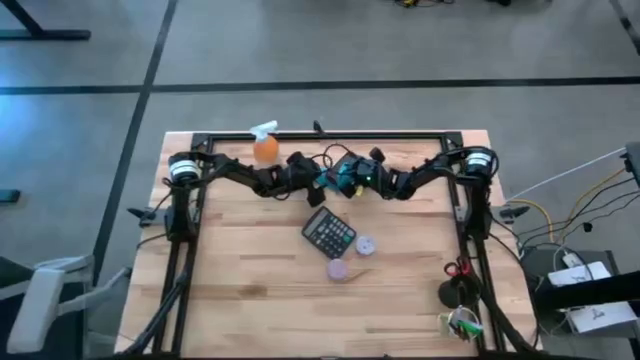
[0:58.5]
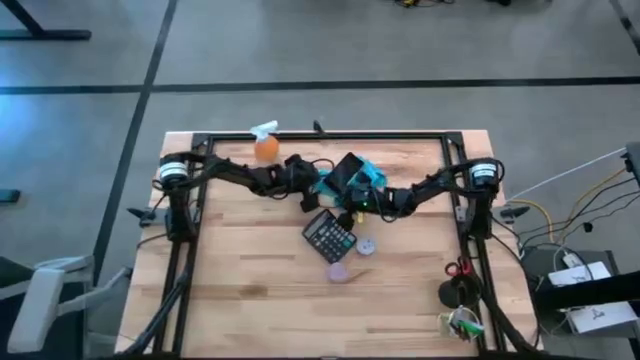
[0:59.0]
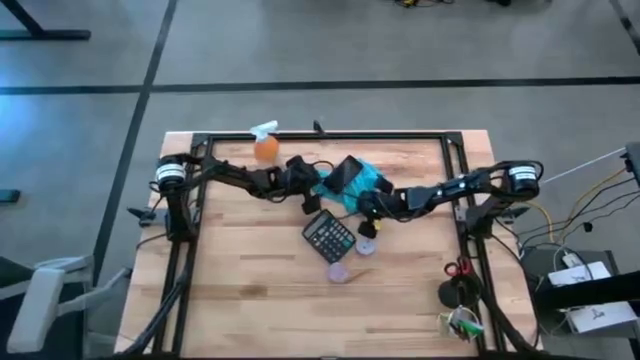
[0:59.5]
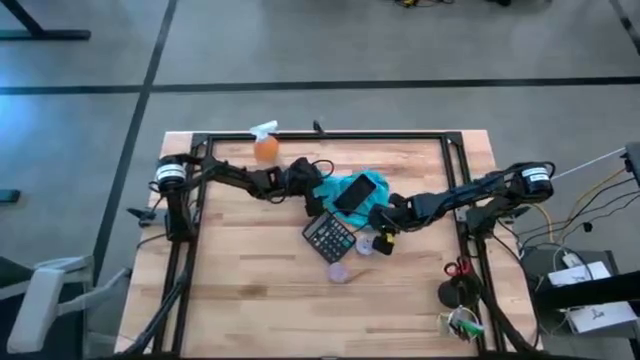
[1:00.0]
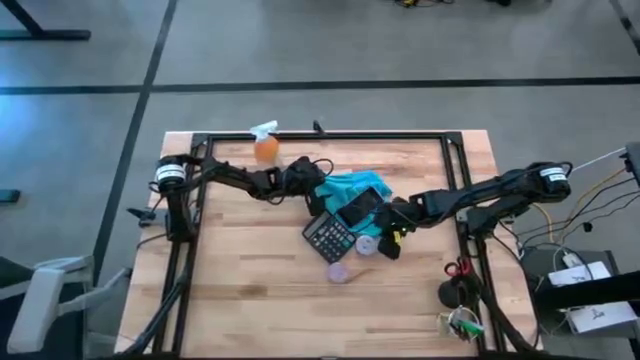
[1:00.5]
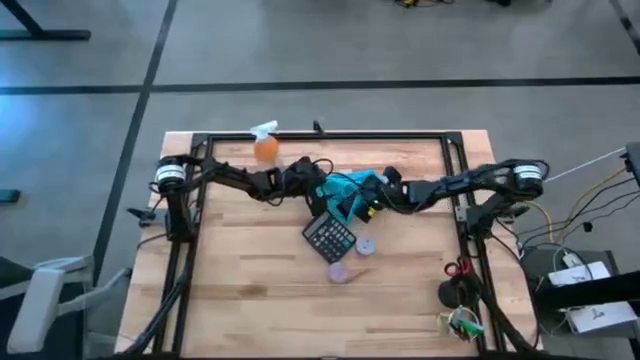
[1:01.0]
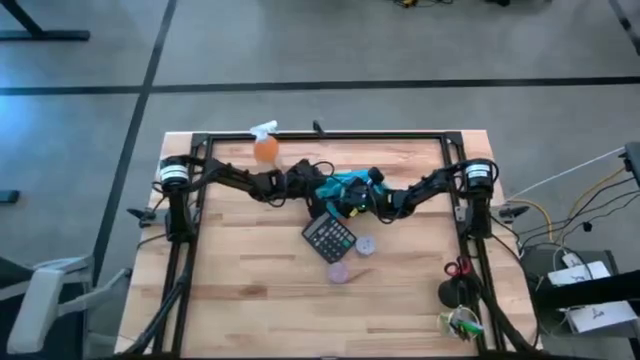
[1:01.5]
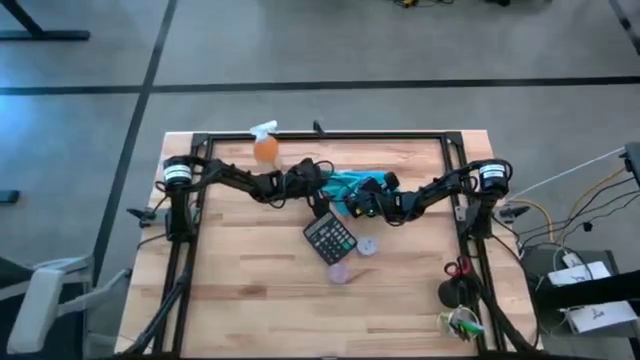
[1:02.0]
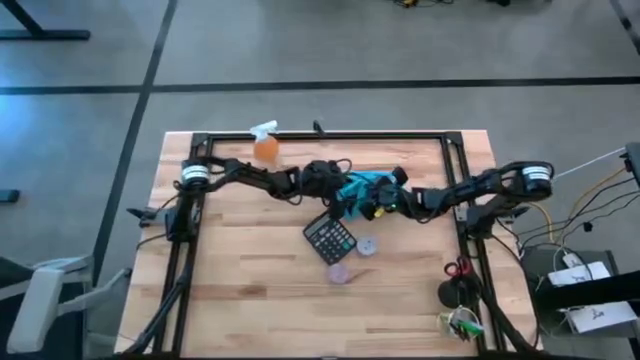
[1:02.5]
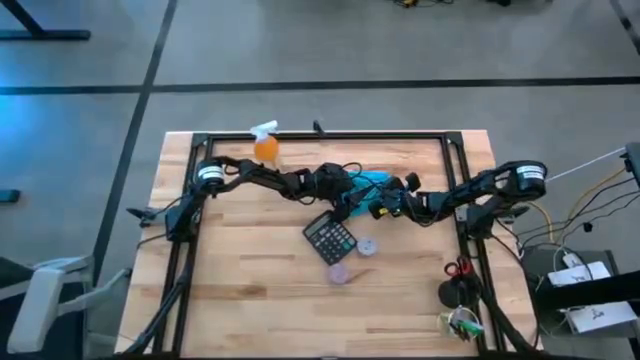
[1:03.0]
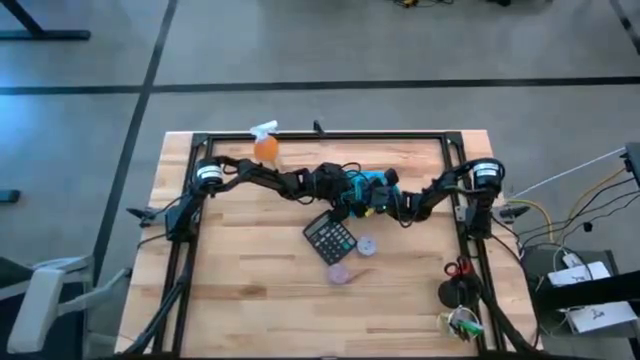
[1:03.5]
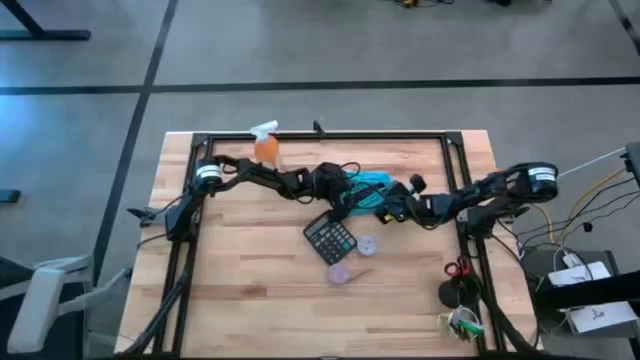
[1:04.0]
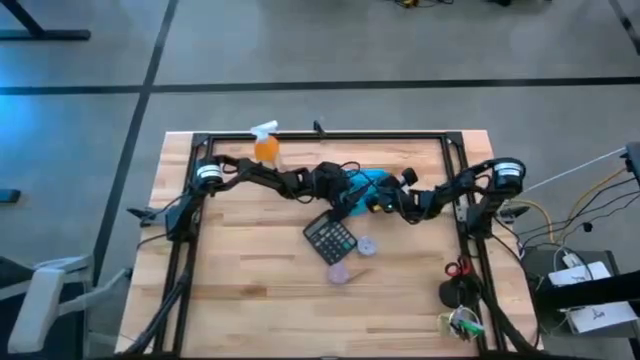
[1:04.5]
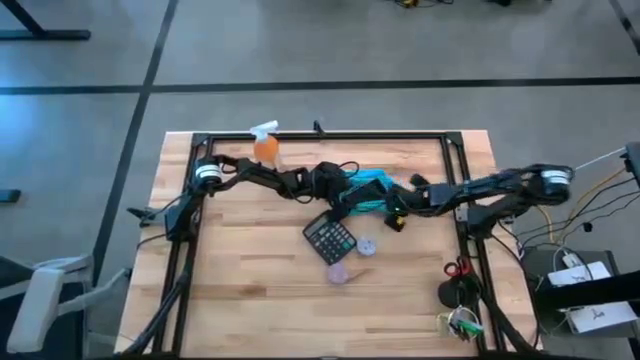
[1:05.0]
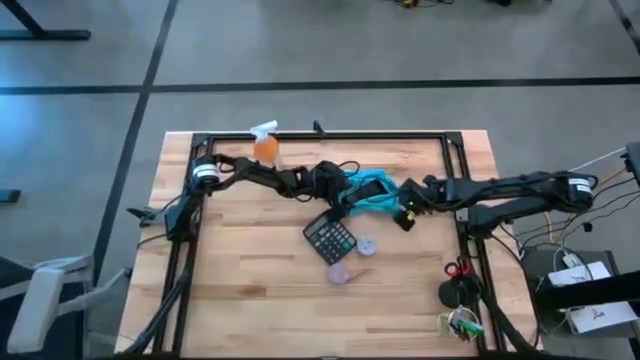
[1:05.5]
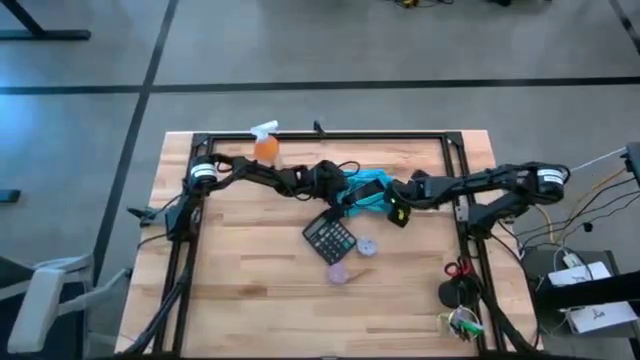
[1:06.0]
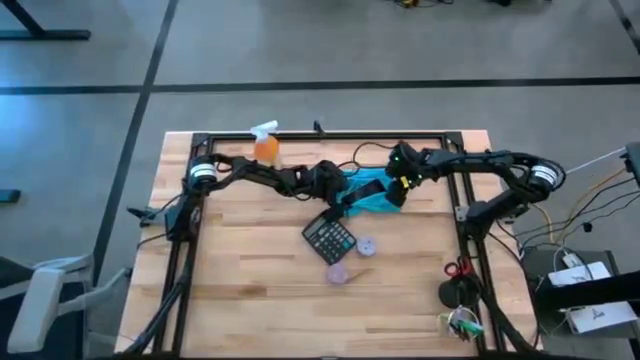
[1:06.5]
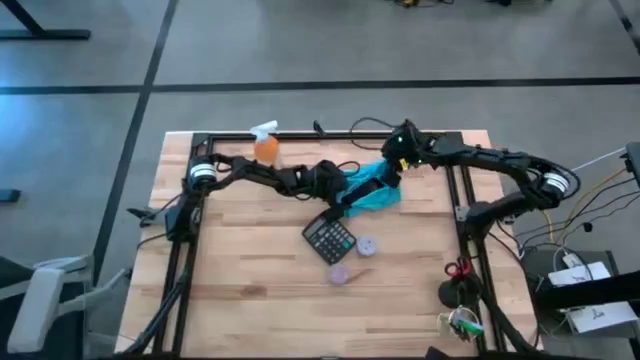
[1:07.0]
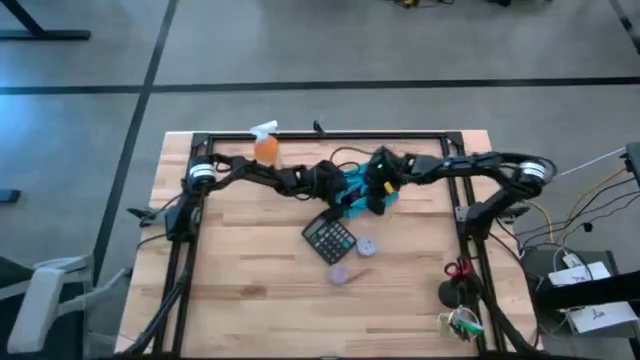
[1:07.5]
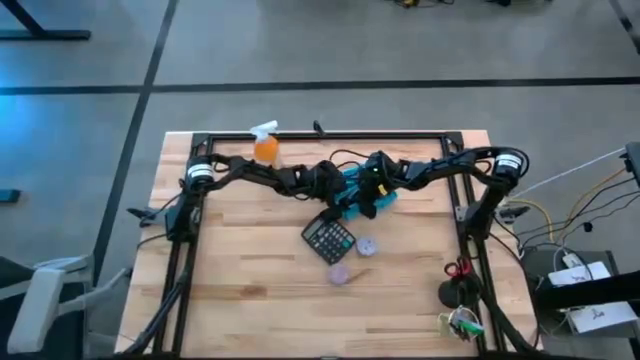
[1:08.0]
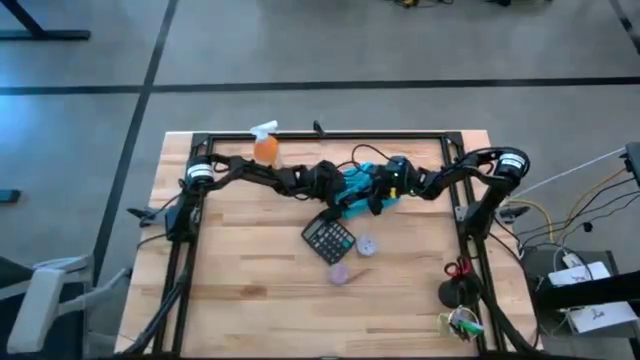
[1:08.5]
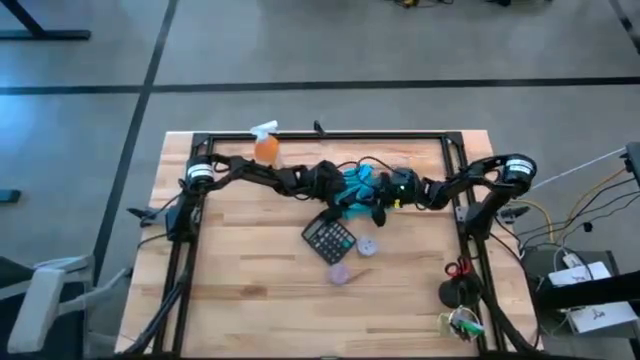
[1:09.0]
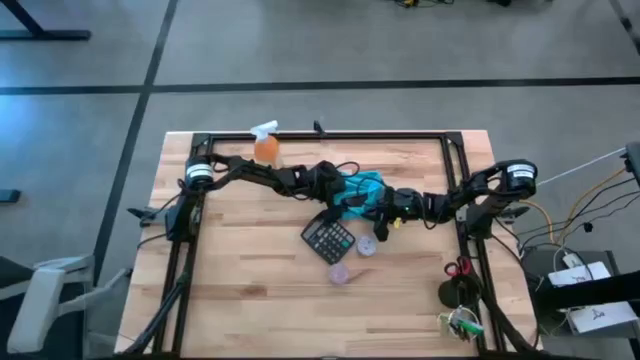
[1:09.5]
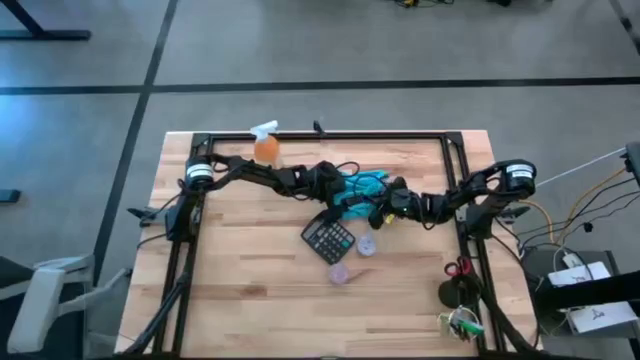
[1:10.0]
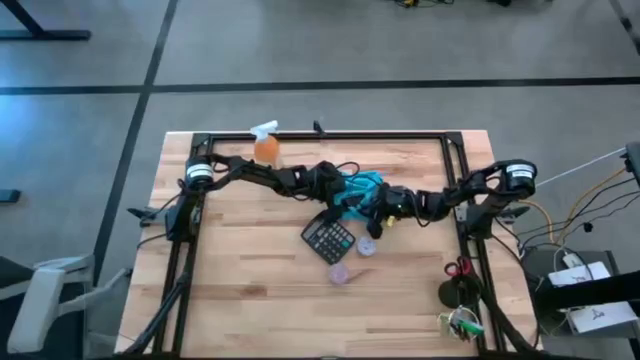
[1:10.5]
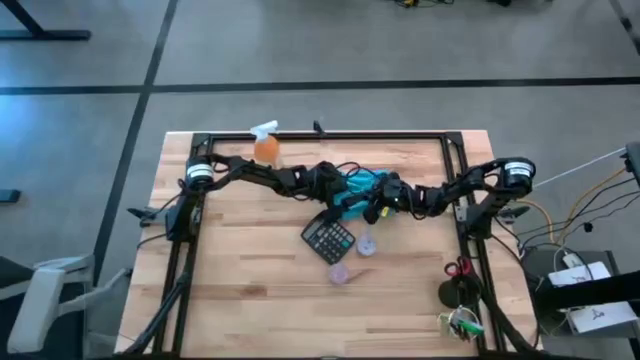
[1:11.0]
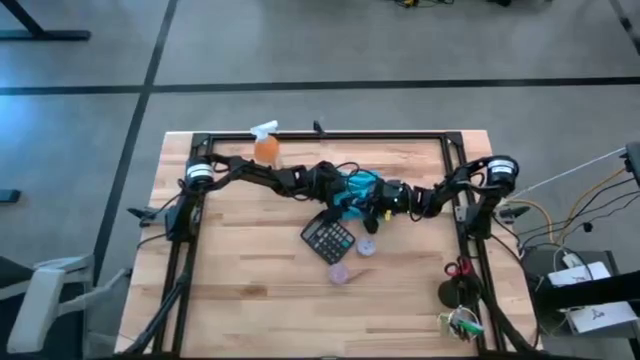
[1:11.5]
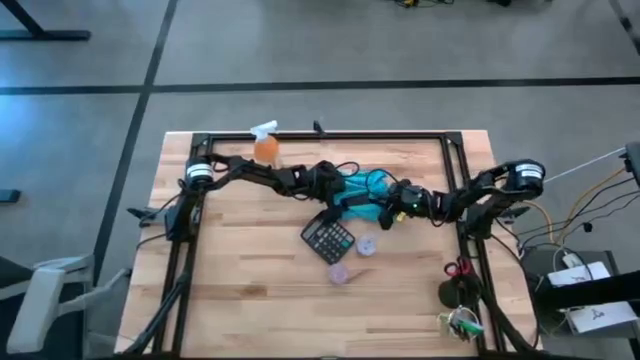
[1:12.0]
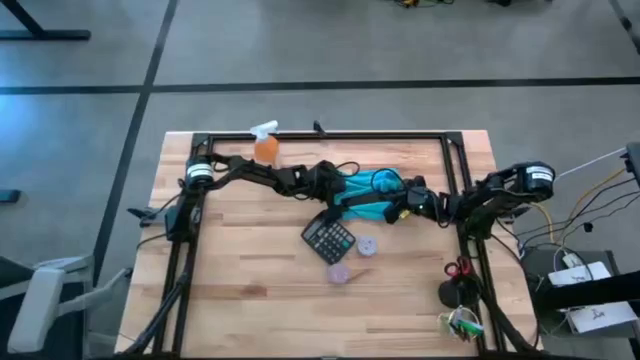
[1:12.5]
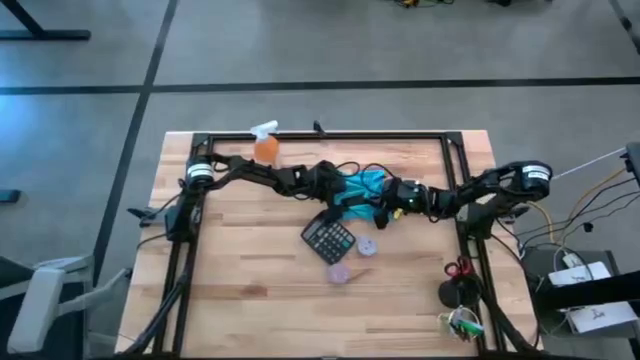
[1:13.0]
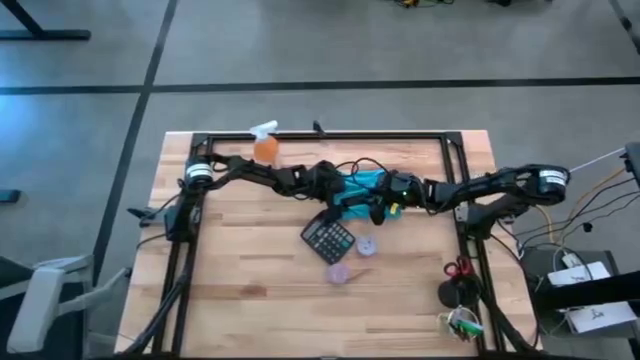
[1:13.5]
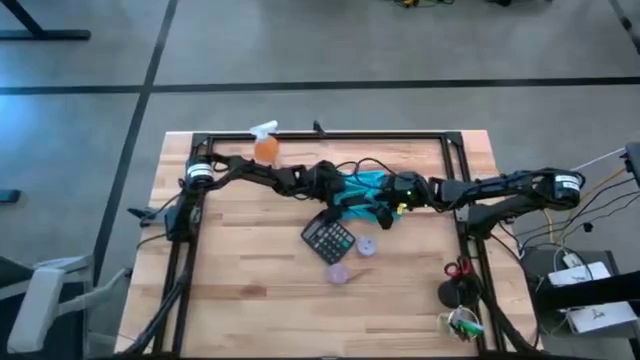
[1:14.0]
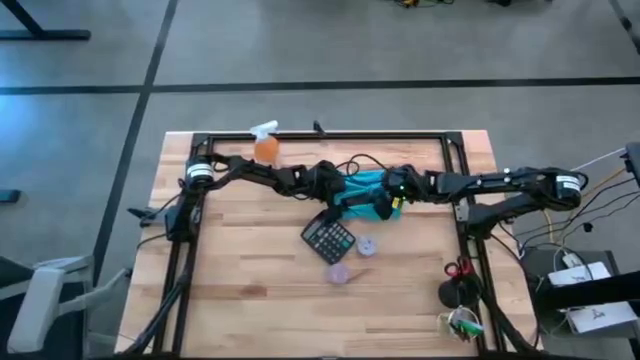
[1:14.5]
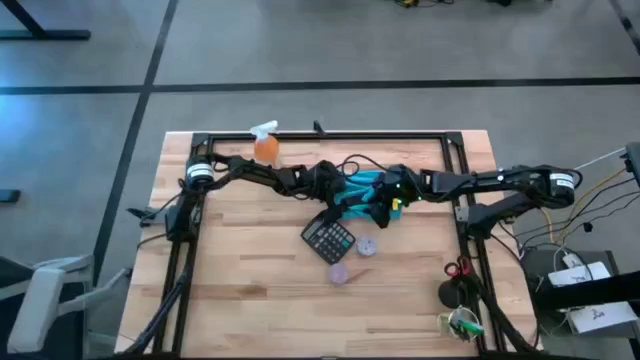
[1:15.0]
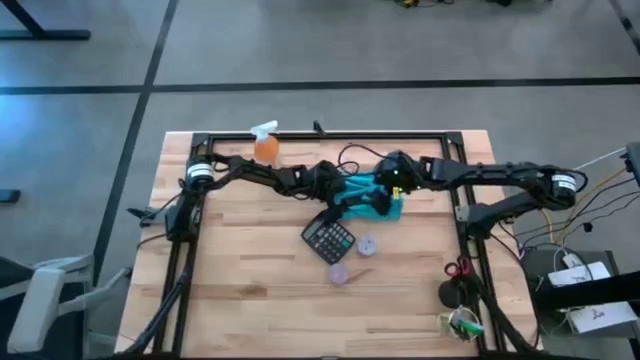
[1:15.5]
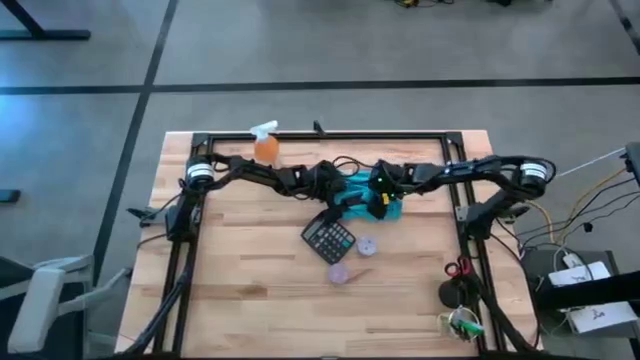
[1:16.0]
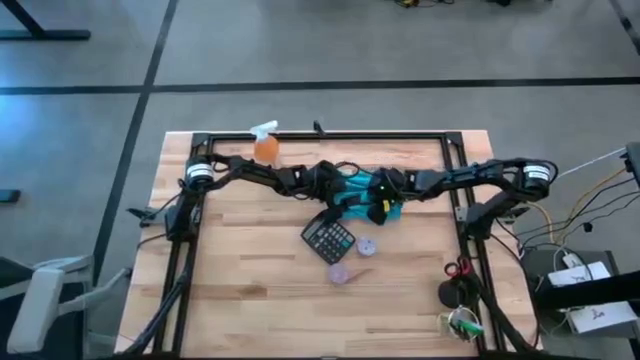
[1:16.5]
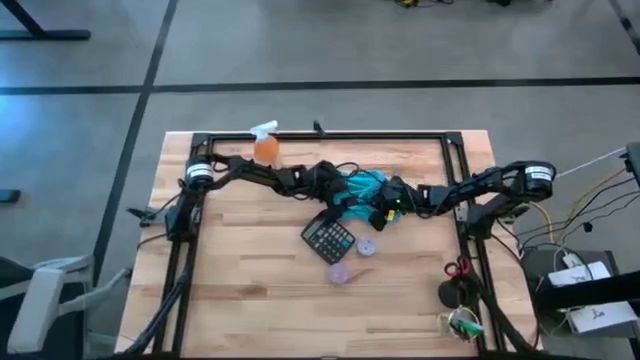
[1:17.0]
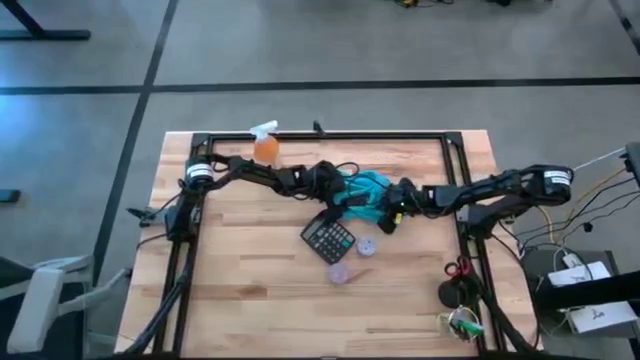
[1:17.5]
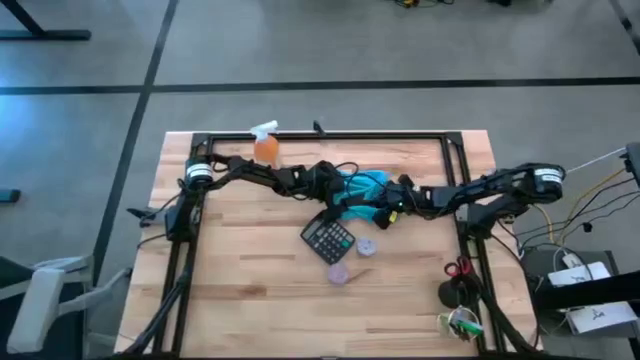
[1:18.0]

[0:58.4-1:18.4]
Task: Apply microfiber cloth
Wipe the pink cellphone using the blue microfiber cloth
